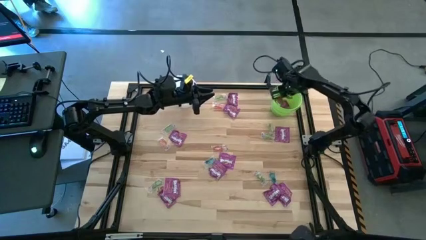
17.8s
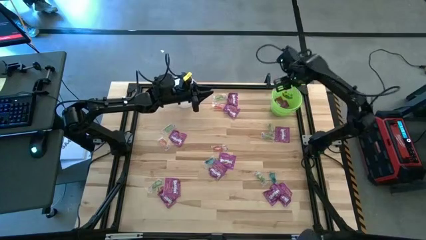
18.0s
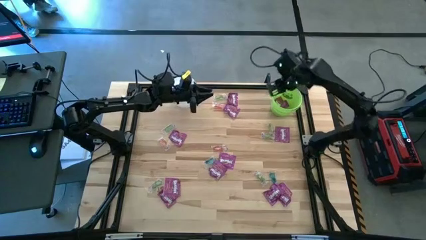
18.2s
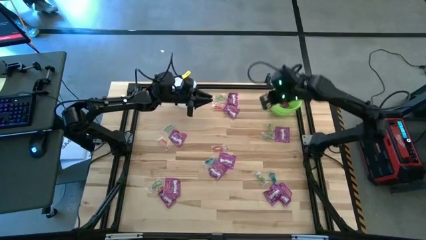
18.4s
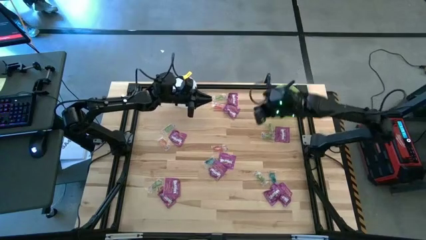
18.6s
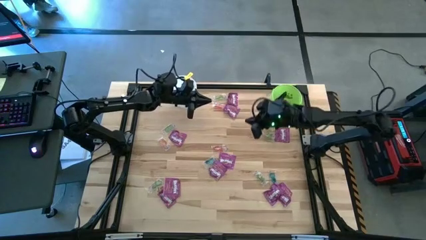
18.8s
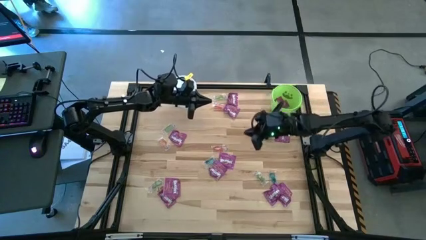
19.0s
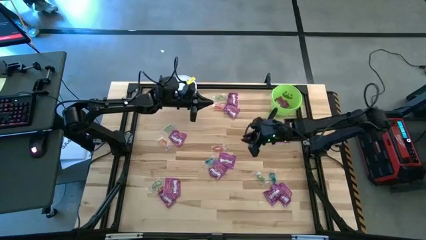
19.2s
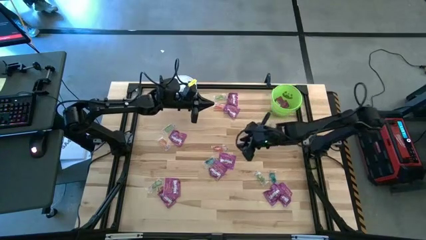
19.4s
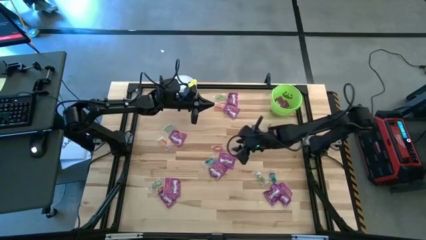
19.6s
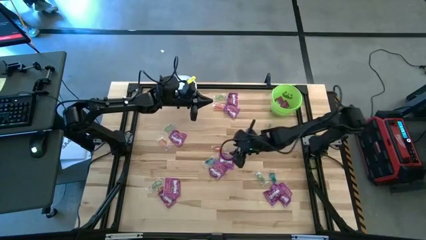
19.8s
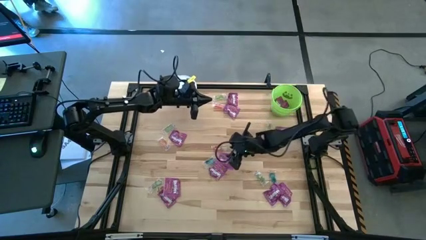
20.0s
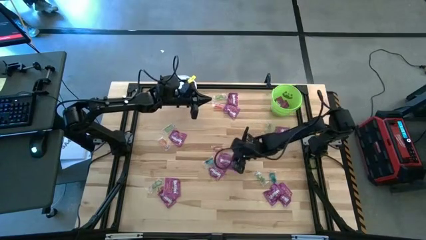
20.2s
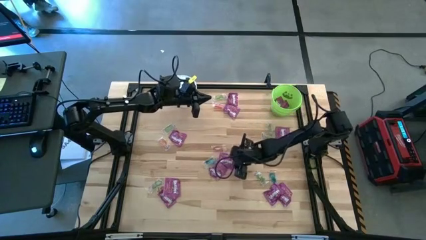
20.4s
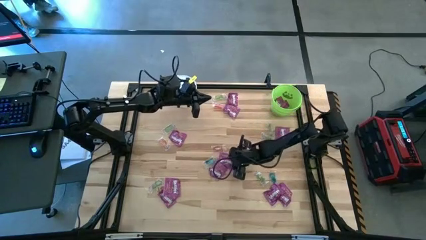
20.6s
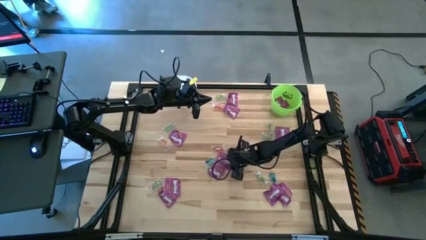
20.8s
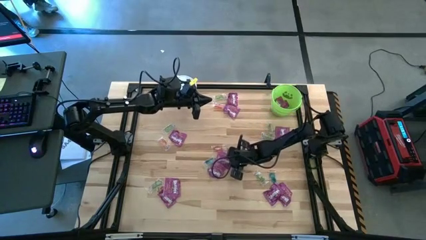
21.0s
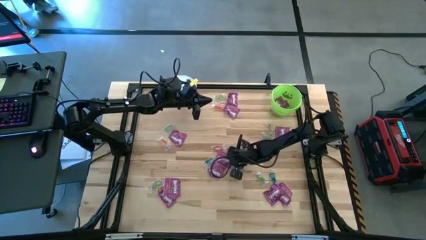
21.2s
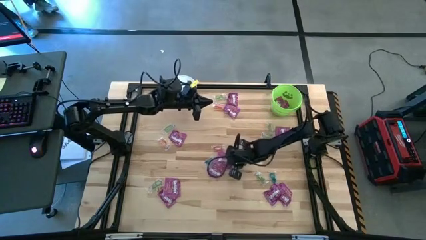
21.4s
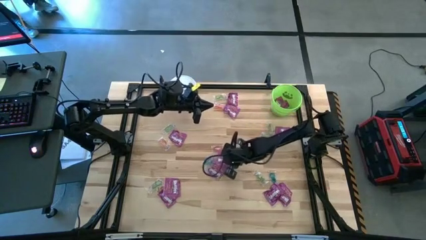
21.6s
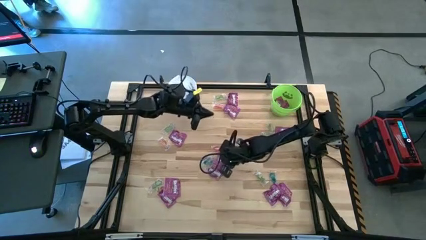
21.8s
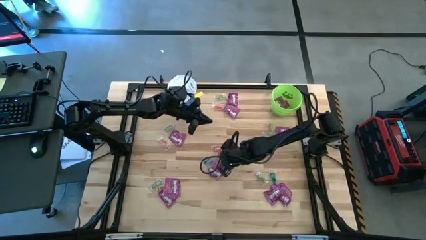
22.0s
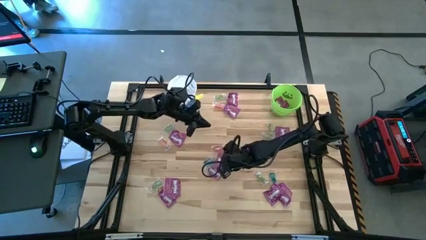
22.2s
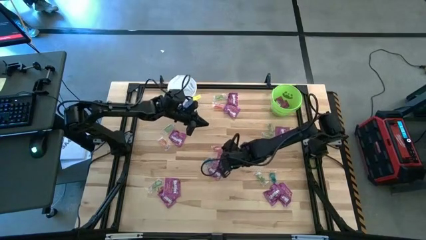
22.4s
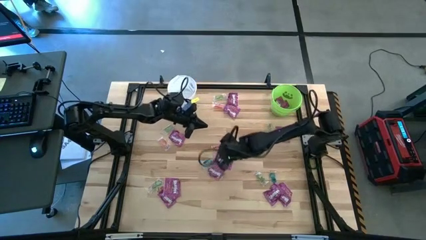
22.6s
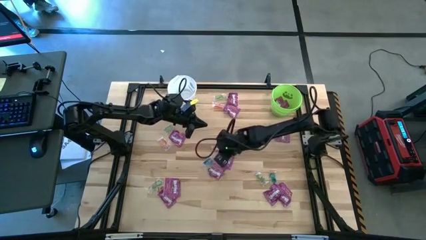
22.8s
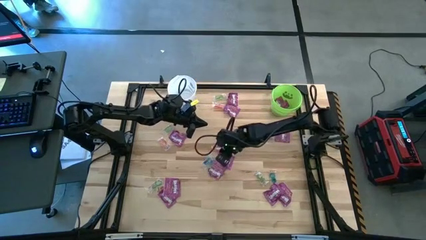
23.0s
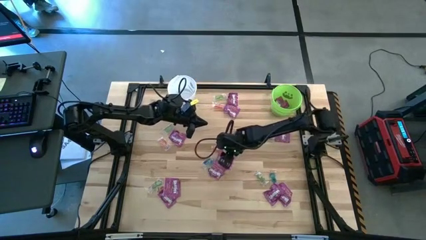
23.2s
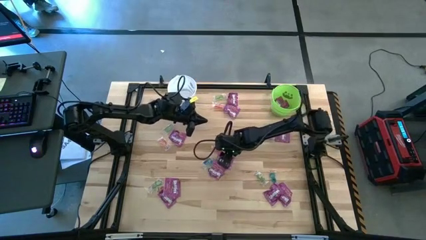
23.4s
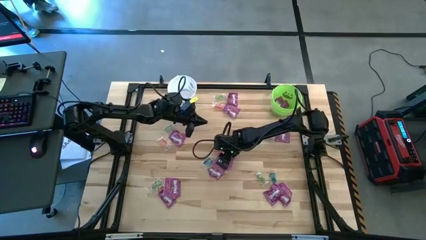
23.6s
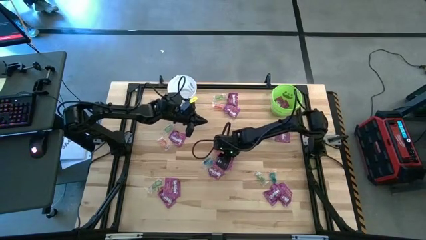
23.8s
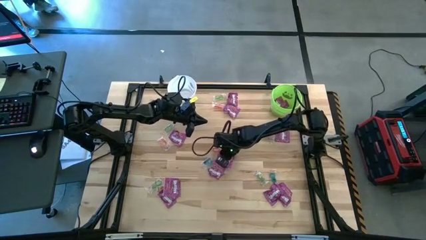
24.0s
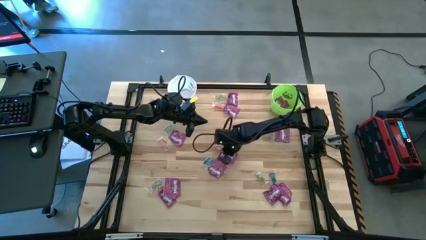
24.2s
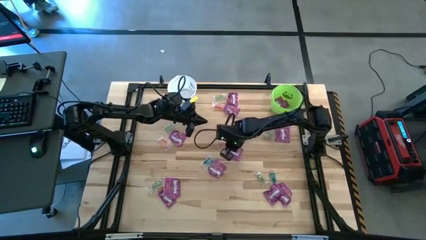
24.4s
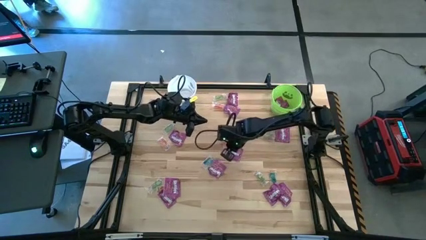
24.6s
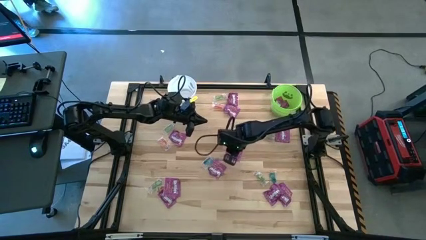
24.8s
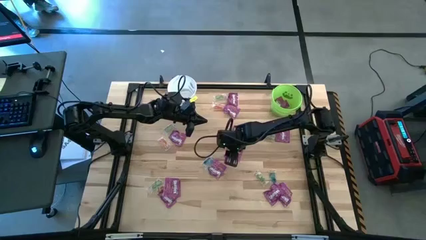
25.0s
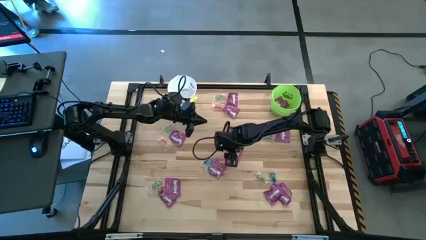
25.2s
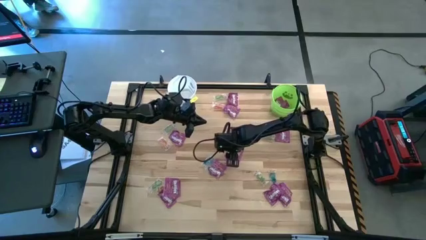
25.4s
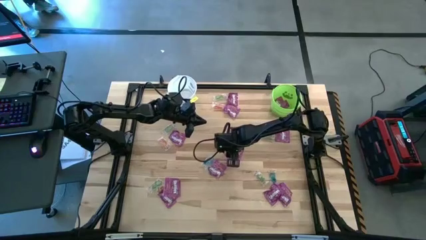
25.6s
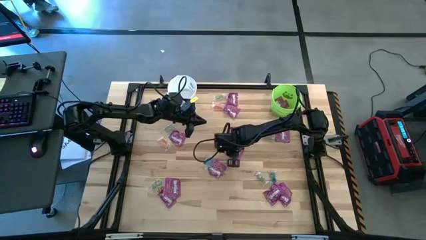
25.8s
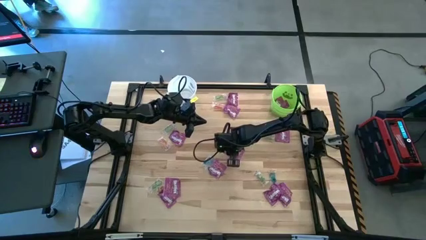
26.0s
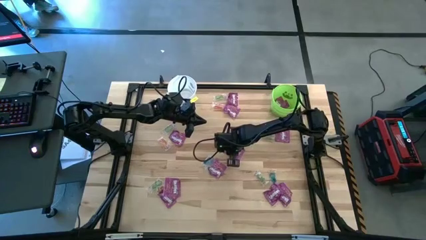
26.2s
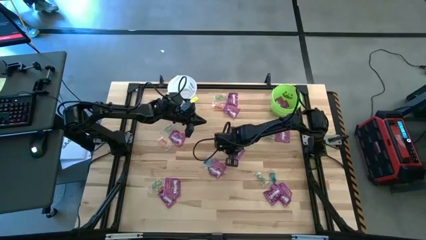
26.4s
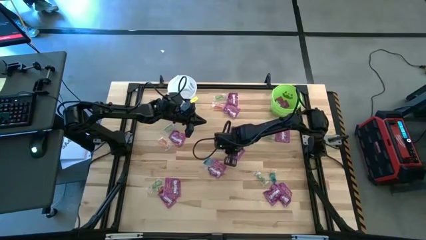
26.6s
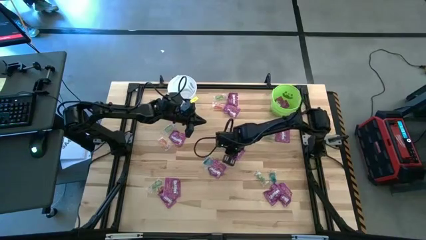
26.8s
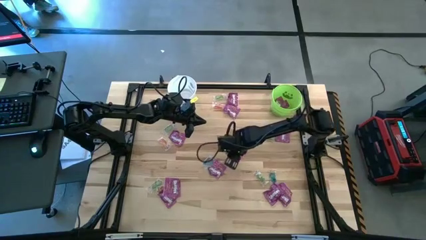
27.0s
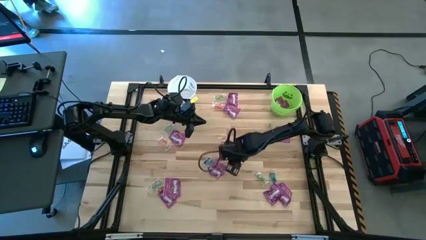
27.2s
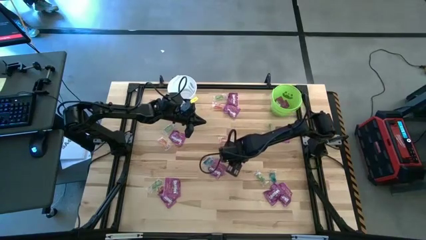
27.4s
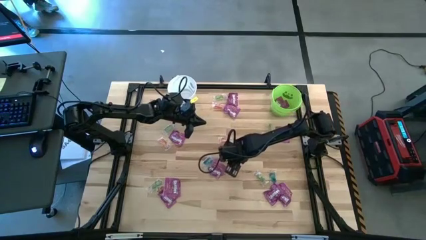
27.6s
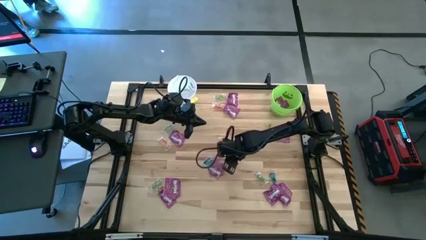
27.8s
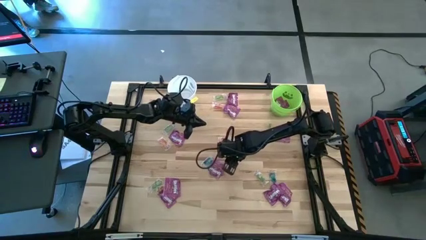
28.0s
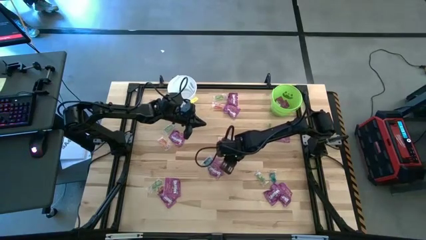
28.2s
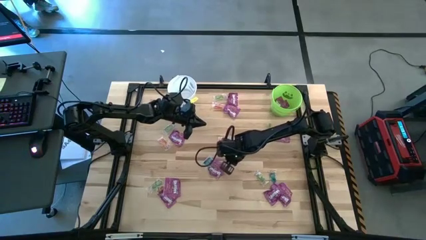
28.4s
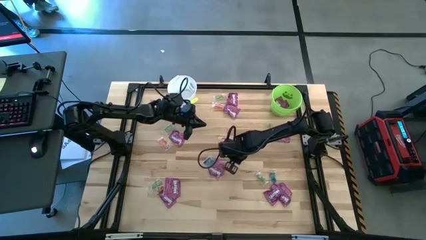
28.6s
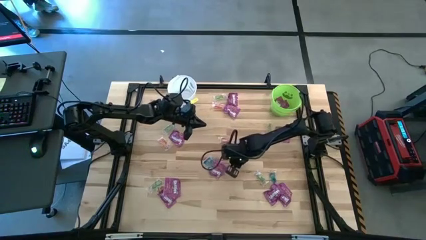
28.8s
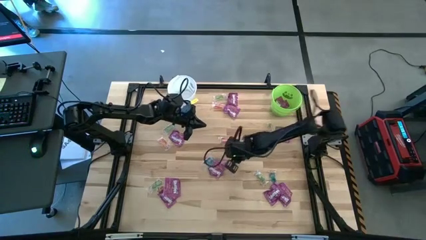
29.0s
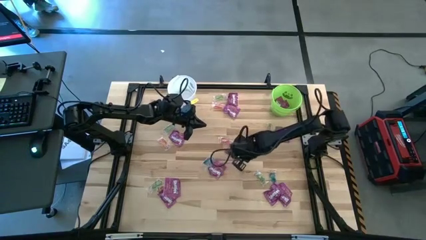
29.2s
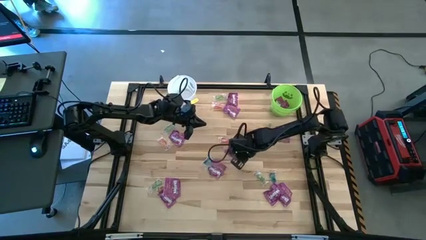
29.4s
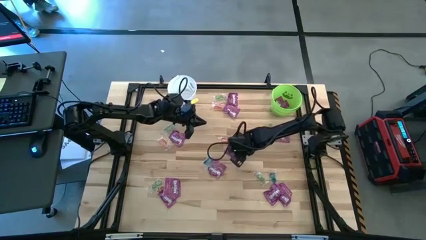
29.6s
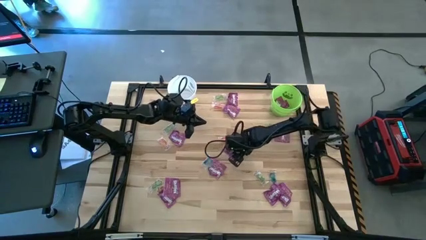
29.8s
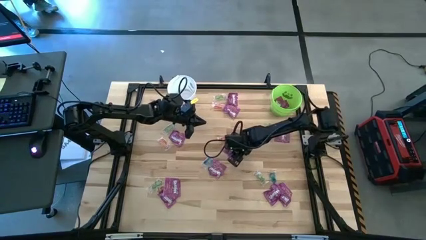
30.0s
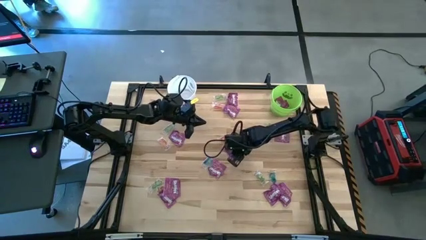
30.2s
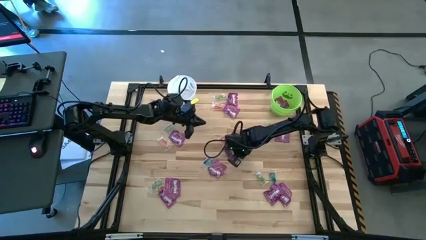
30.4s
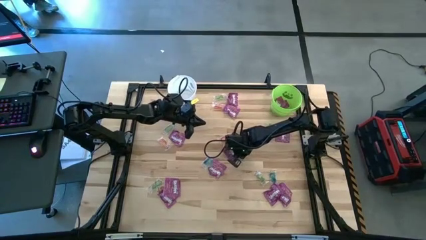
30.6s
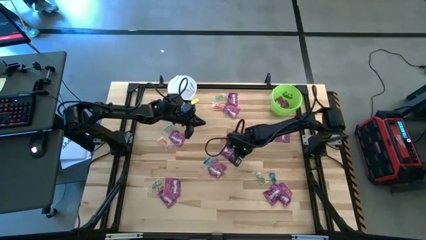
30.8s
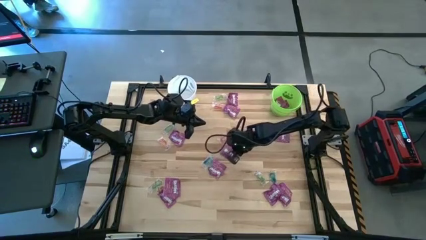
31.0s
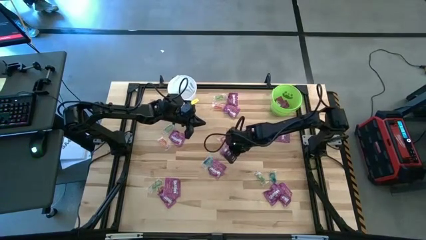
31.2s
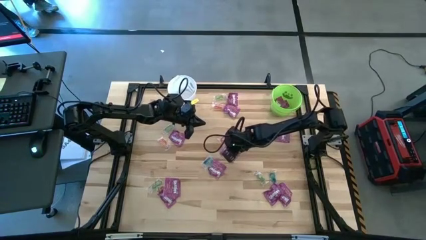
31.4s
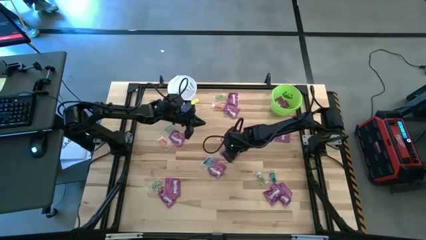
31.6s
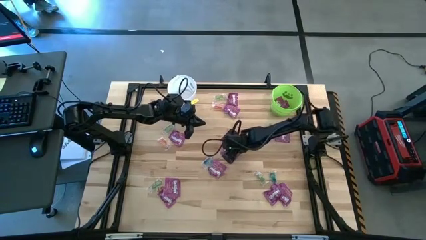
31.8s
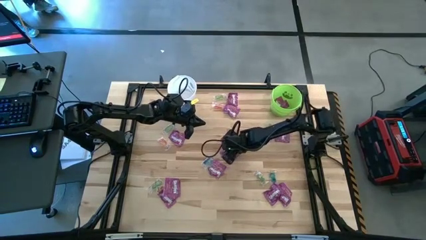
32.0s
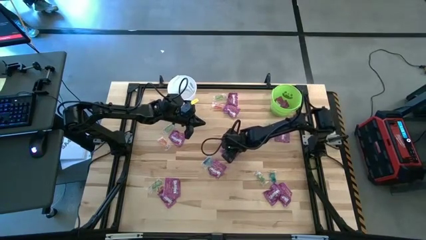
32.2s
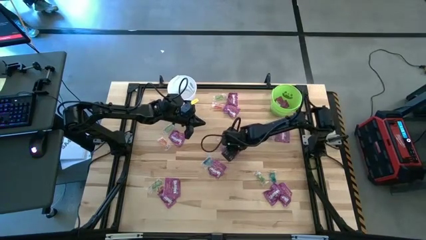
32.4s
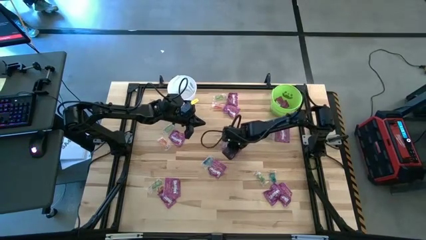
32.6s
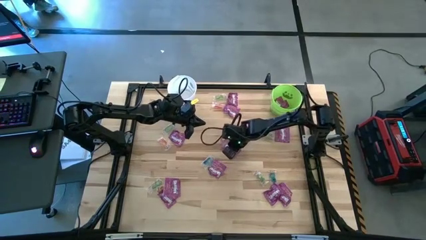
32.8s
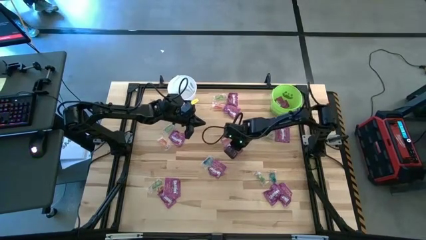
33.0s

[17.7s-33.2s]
Task: Sort candy by brand, put in halloween buckets
Put the violet candy into the green bucket
